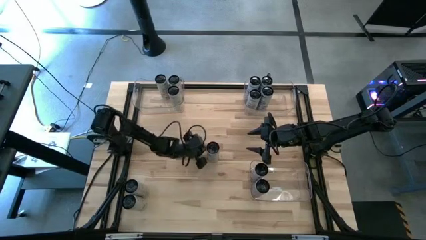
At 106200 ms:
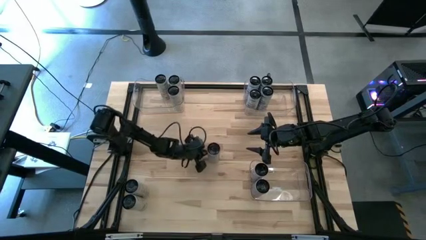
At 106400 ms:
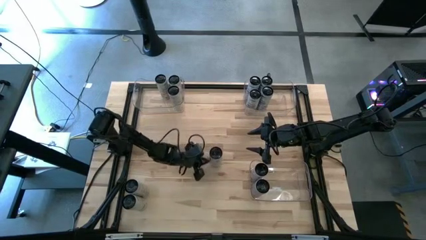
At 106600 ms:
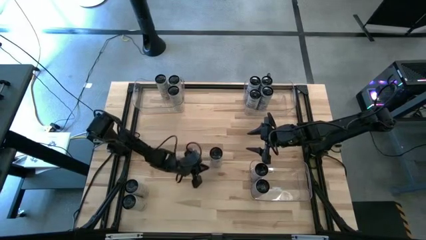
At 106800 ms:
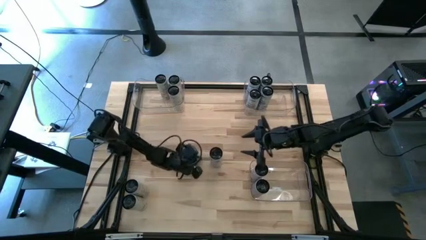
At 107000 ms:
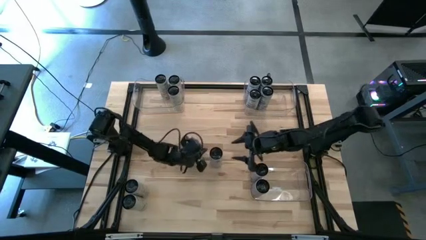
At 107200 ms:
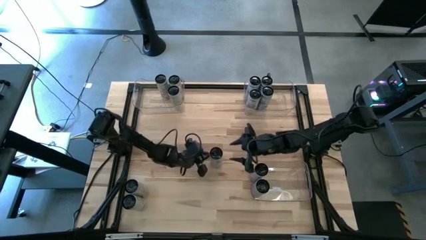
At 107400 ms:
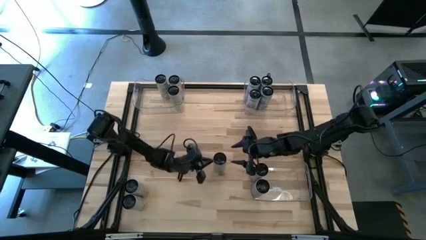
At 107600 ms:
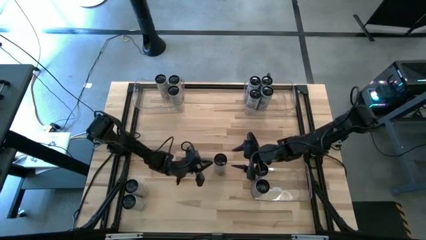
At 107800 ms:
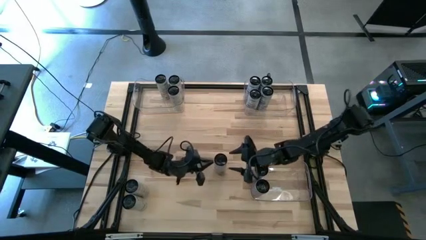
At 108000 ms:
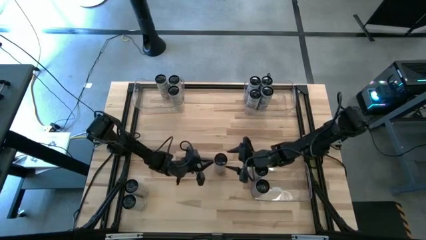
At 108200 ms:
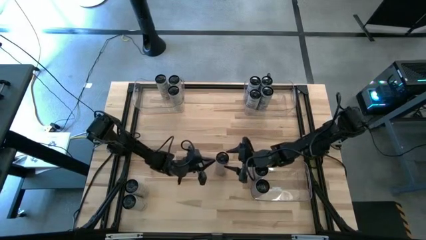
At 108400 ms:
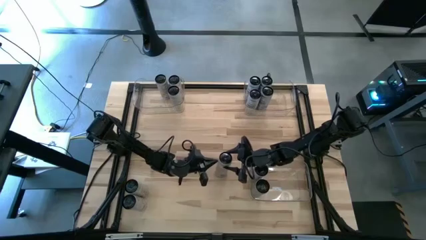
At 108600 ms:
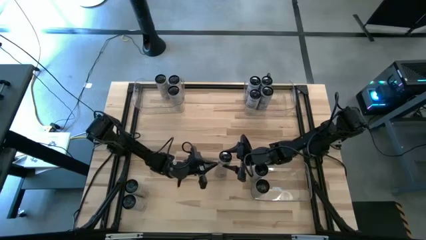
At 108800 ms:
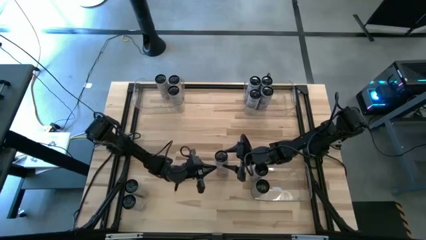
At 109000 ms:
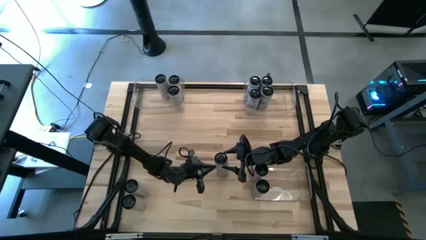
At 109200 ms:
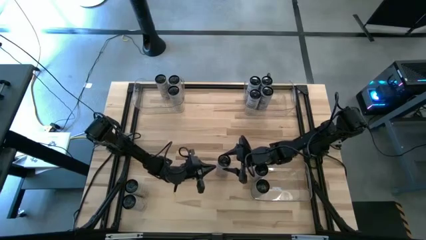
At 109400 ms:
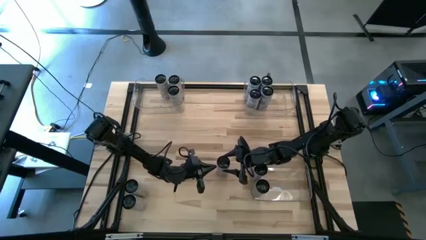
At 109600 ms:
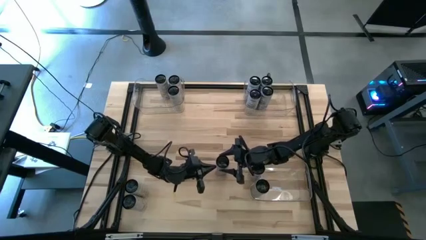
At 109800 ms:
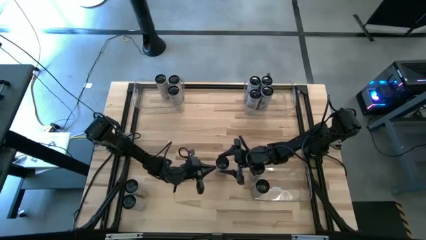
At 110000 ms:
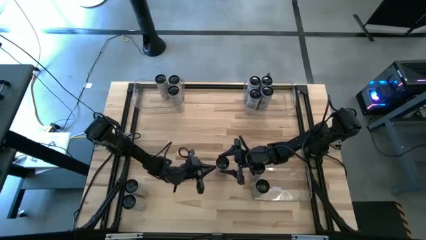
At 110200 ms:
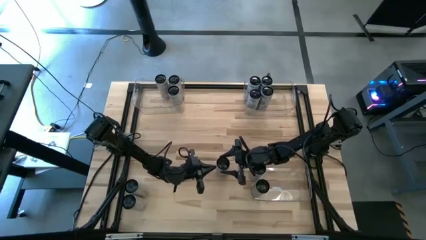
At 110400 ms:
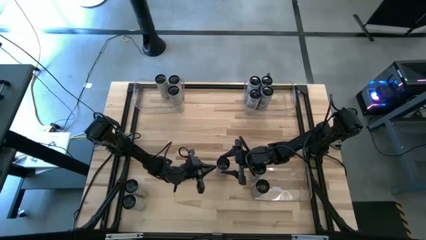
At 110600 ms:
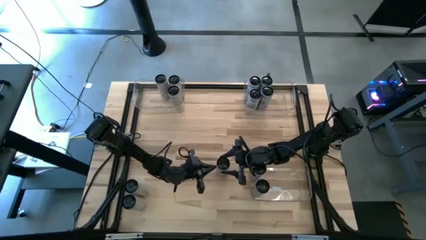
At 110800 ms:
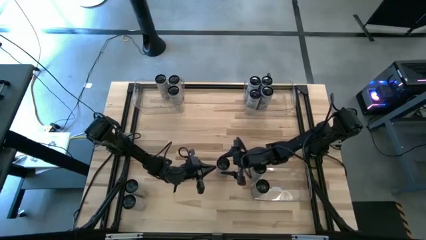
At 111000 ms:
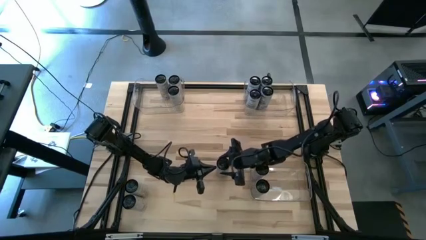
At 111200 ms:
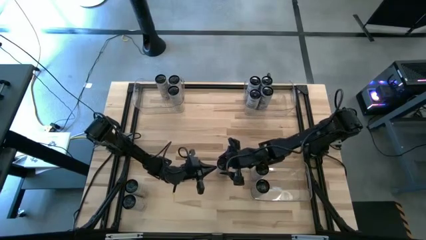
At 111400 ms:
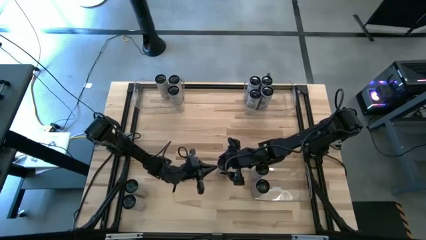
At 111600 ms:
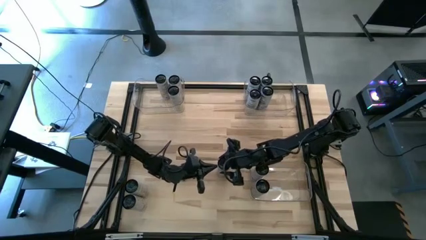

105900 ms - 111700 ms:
Task: Sort soda cans
Put the white-pink soda can into the bottom right transparent bin

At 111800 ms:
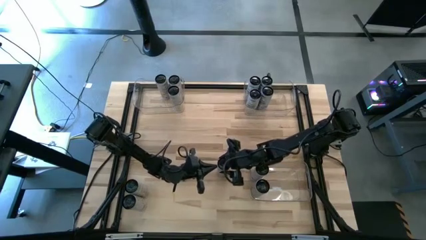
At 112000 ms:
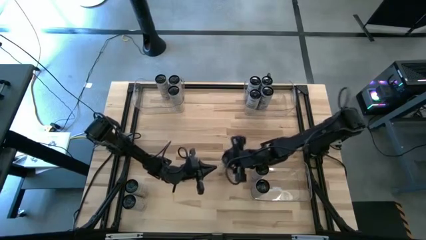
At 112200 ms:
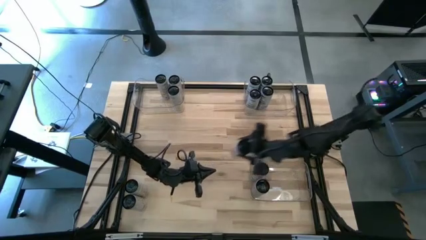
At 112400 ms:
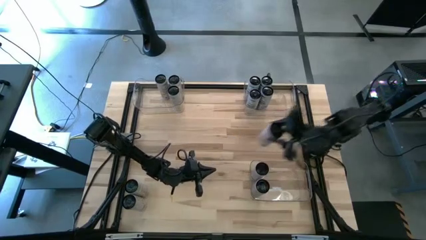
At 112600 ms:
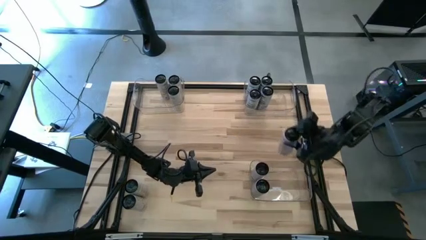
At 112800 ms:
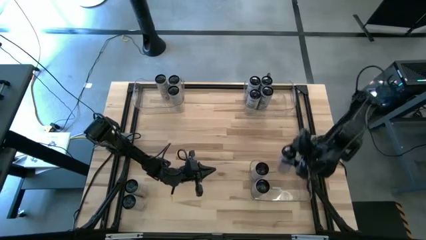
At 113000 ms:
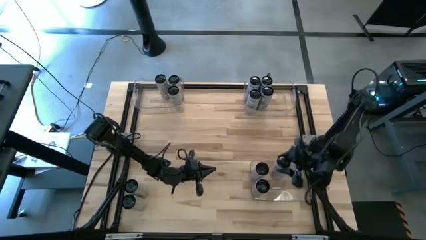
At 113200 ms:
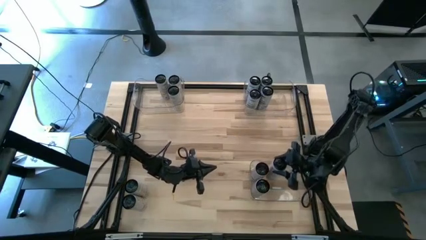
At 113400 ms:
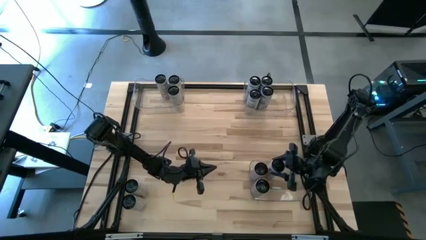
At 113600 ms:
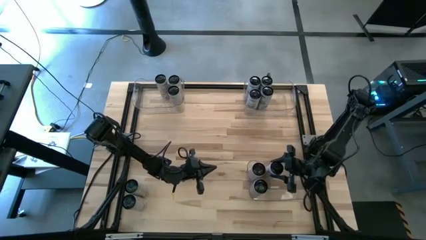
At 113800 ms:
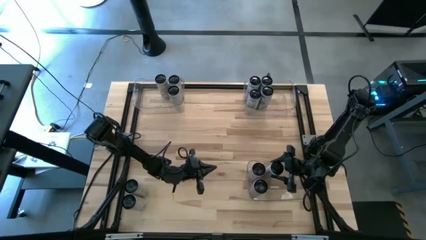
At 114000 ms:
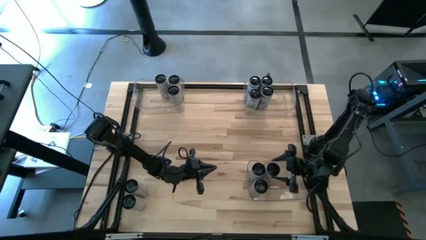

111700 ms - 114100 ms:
Put the white-pink soda can into the bottom right transparent bin

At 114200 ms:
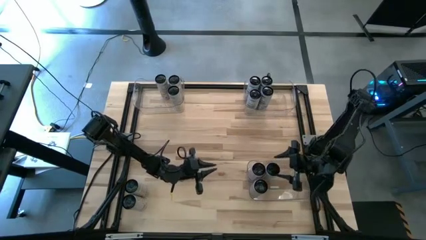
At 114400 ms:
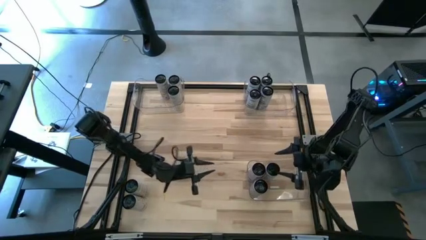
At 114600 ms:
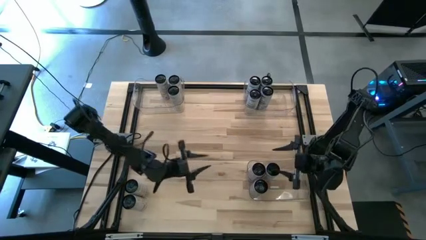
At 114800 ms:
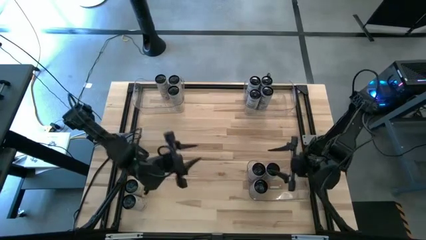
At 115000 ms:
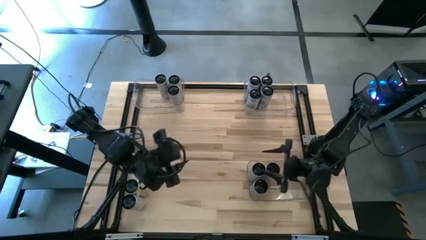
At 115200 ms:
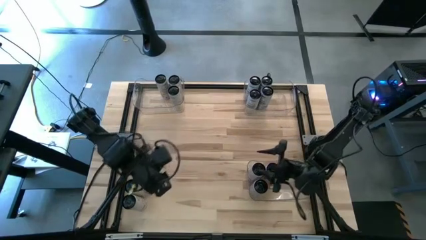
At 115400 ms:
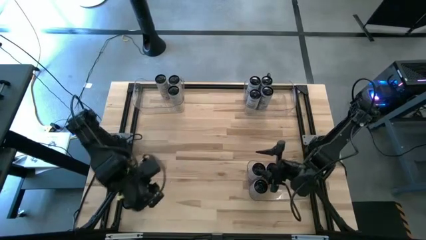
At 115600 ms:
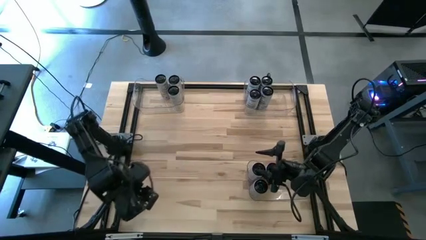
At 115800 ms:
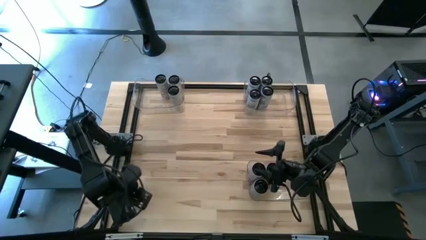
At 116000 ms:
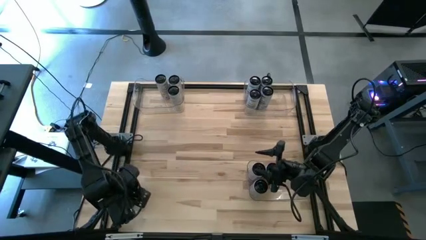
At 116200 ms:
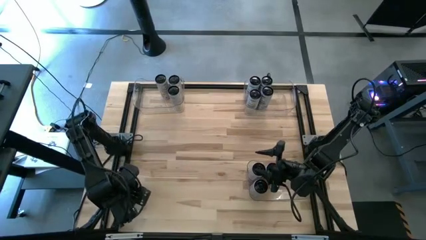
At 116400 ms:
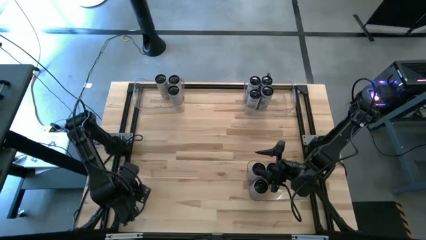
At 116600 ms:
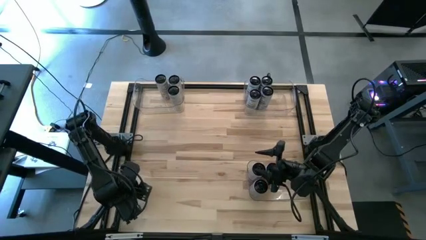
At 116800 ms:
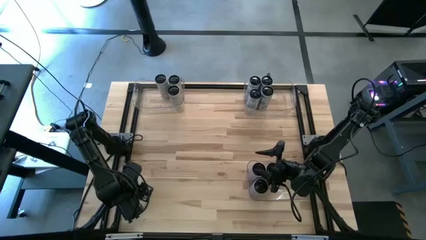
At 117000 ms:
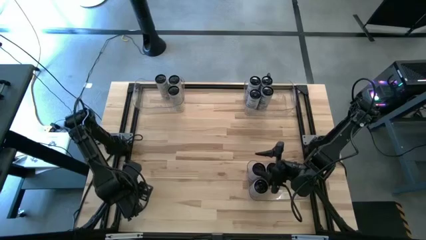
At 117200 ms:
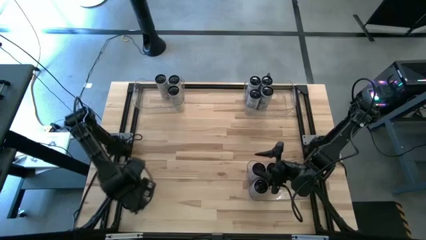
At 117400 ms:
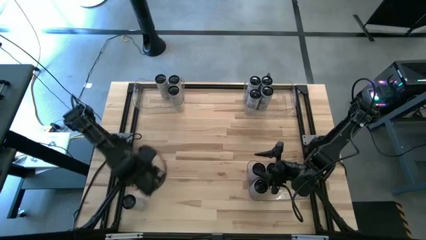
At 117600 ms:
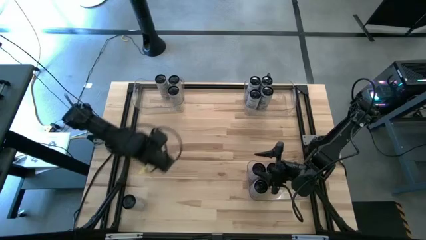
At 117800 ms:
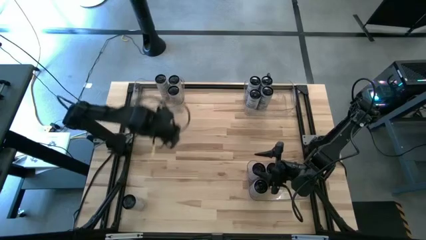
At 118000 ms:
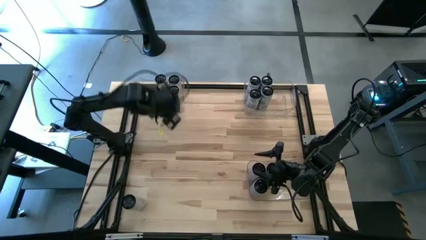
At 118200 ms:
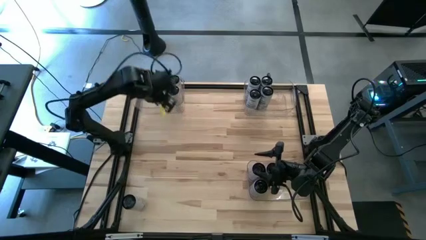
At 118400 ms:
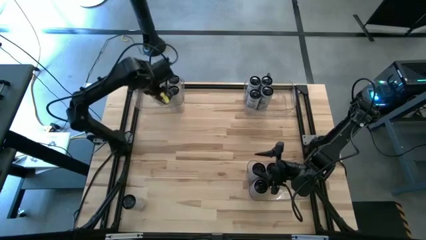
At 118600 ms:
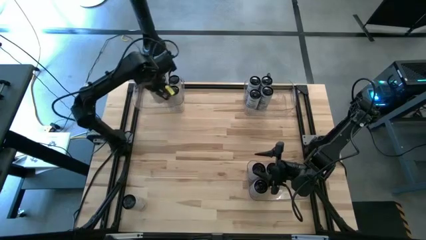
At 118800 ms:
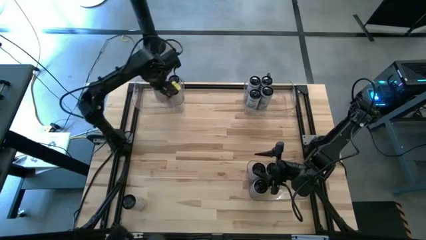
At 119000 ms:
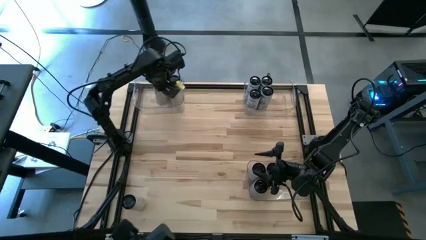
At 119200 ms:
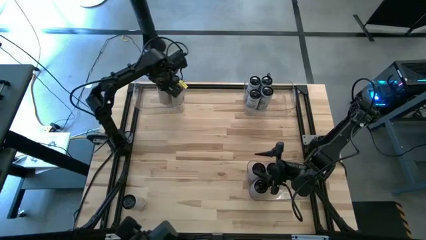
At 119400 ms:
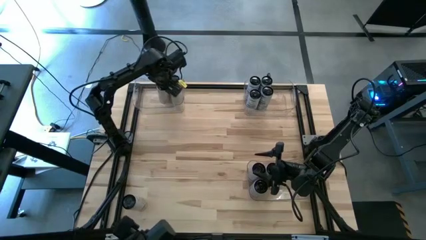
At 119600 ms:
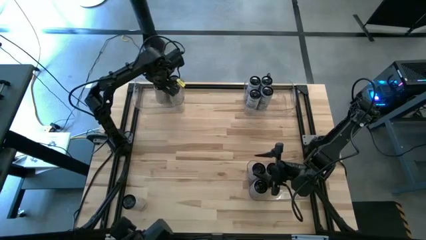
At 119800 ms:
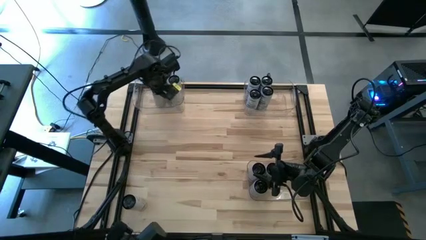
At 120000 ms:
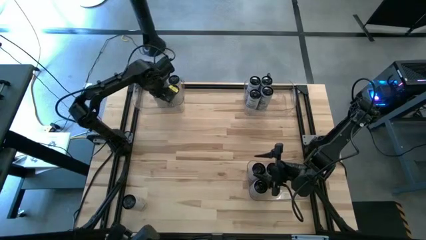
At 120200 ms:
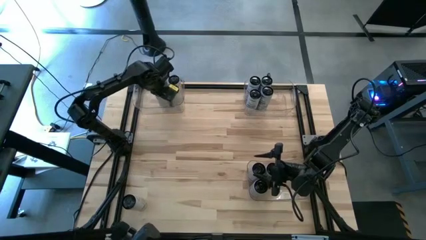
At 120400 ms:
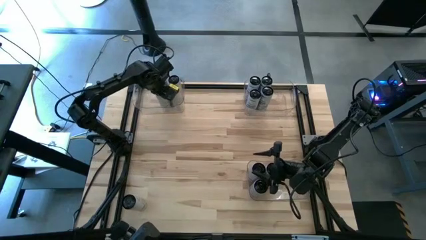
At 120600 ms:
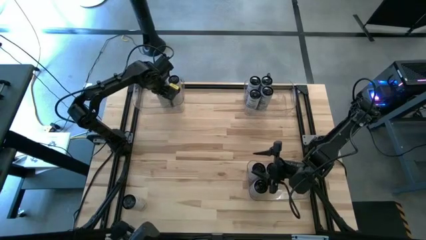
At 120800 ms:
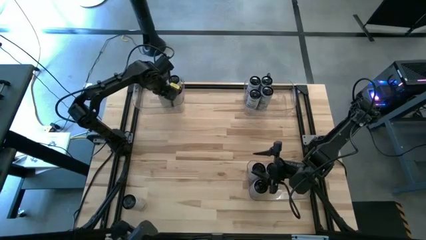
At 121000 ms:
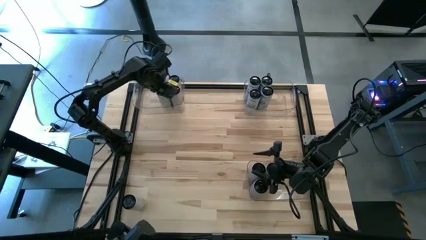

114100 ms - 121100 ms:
Put the white-yellow soda can into the top left transparent bin
